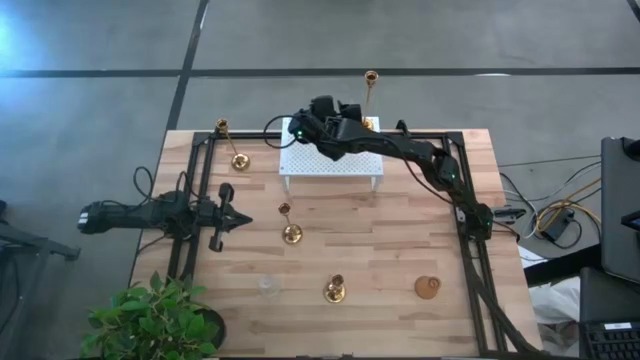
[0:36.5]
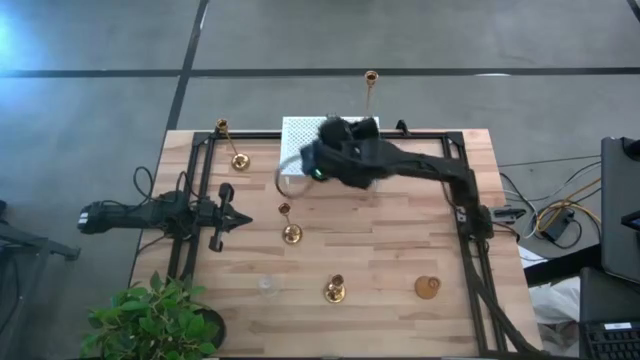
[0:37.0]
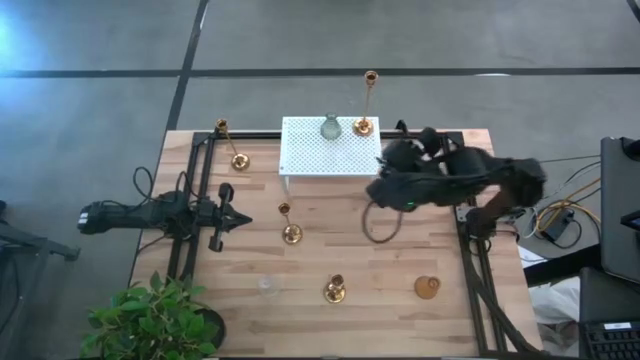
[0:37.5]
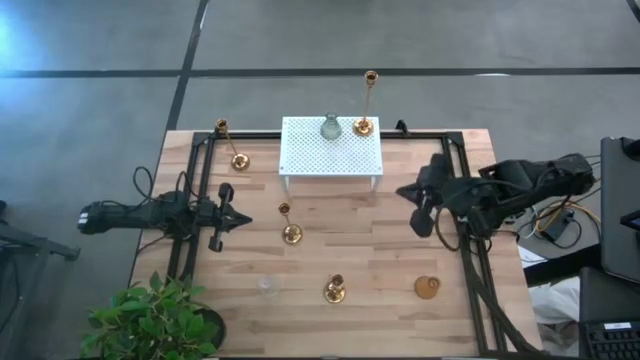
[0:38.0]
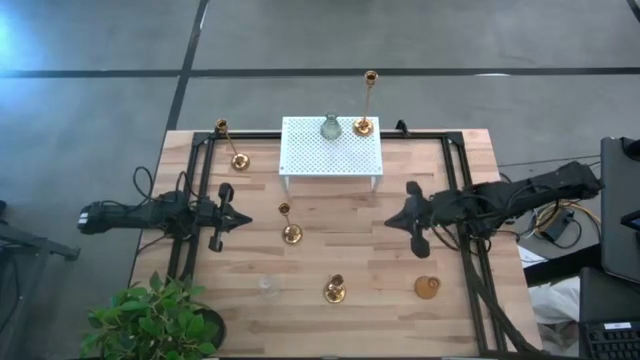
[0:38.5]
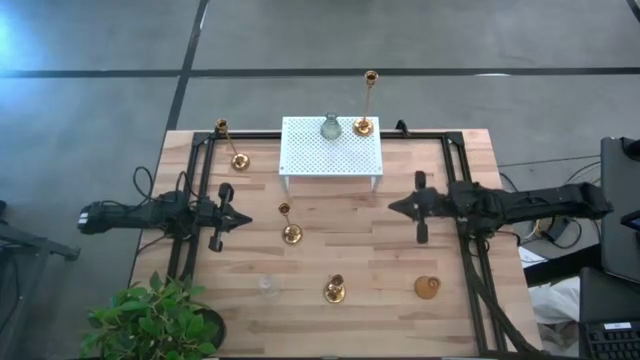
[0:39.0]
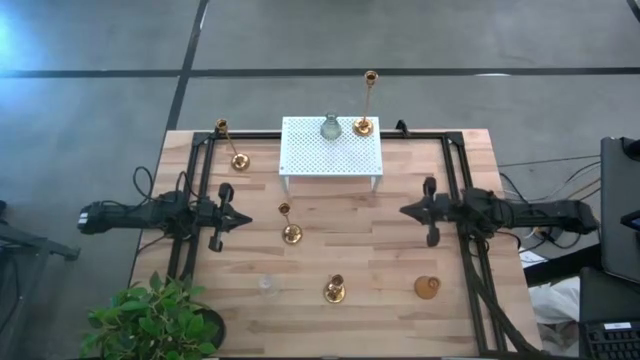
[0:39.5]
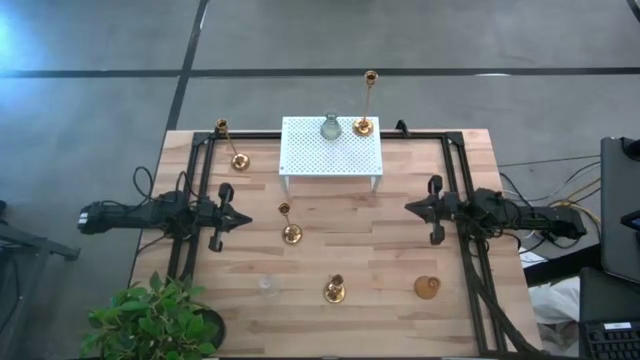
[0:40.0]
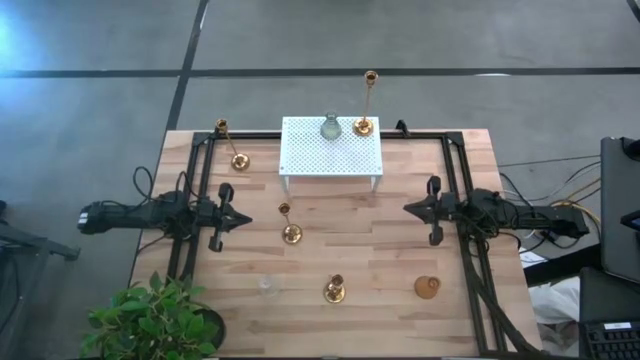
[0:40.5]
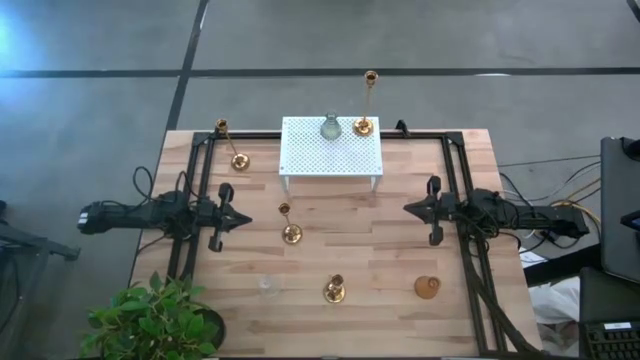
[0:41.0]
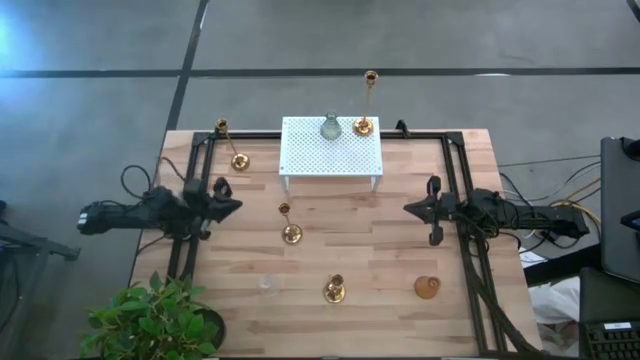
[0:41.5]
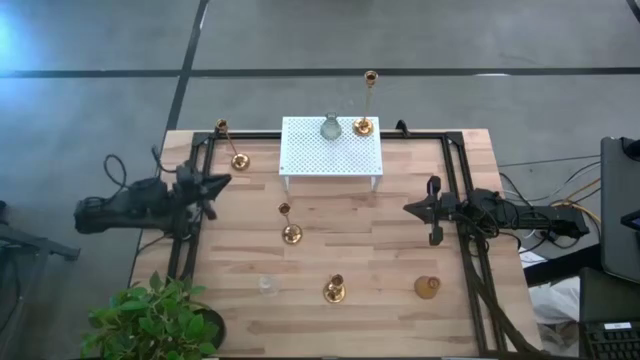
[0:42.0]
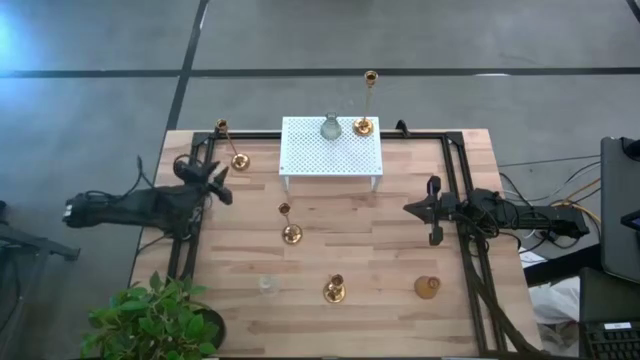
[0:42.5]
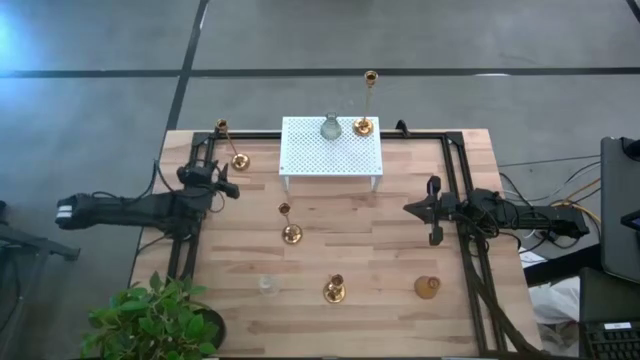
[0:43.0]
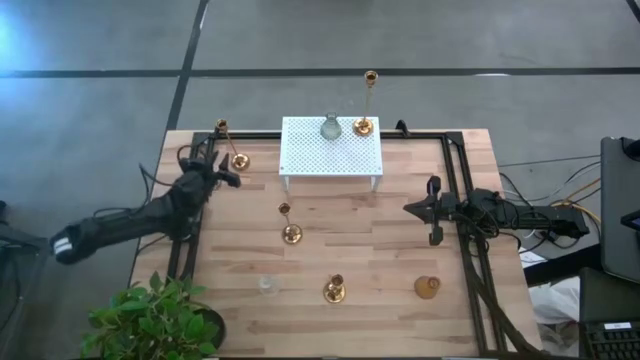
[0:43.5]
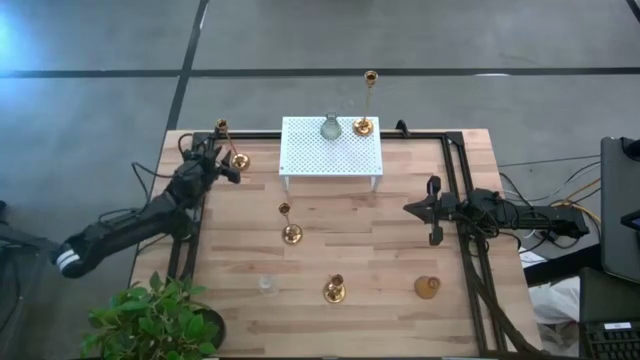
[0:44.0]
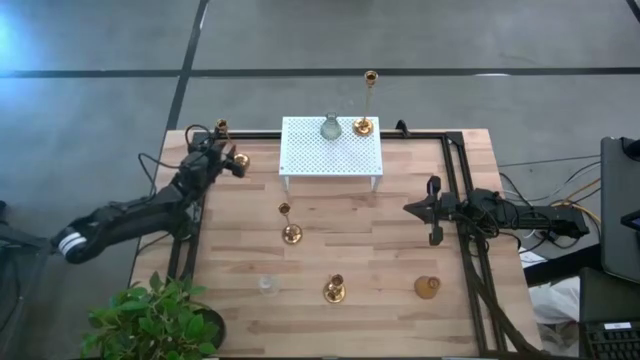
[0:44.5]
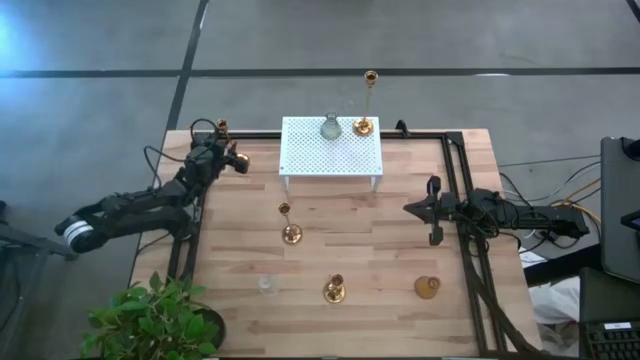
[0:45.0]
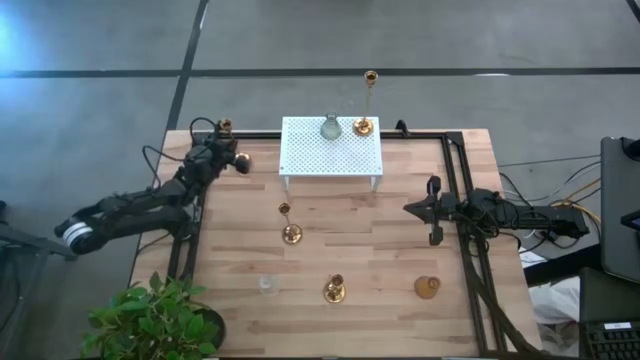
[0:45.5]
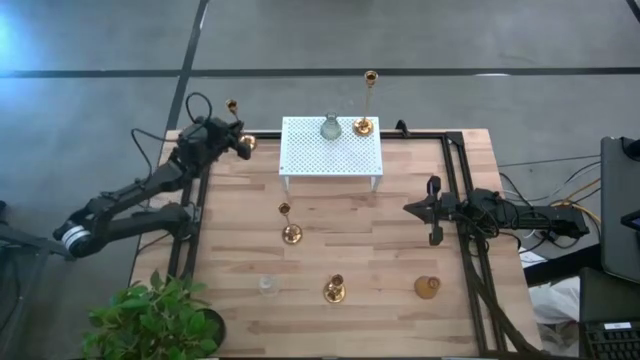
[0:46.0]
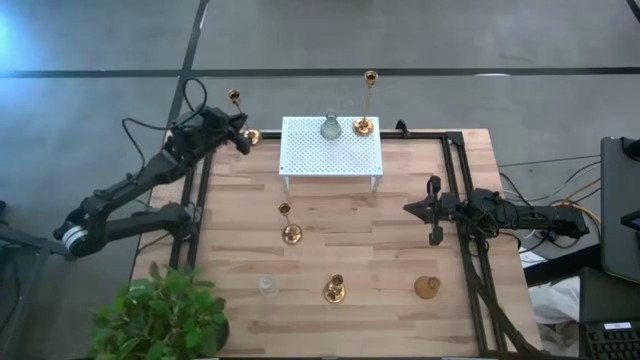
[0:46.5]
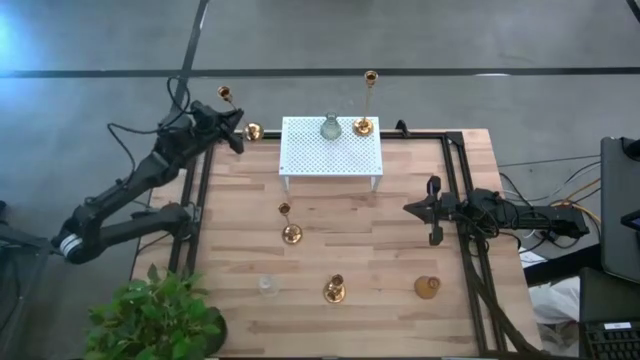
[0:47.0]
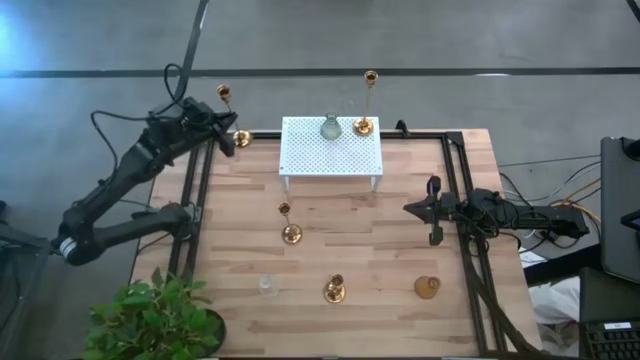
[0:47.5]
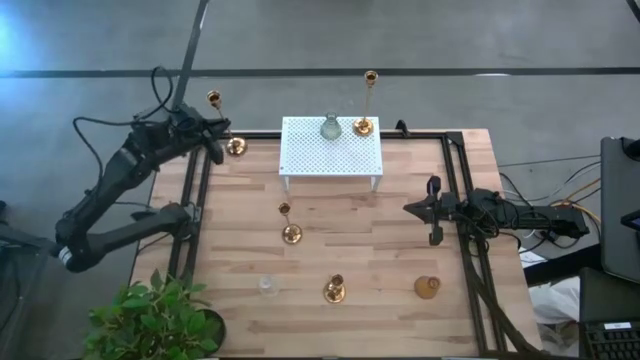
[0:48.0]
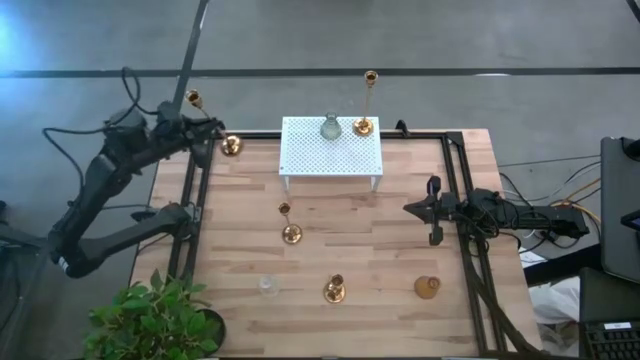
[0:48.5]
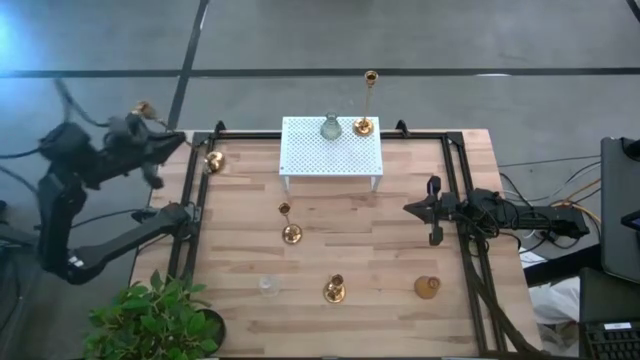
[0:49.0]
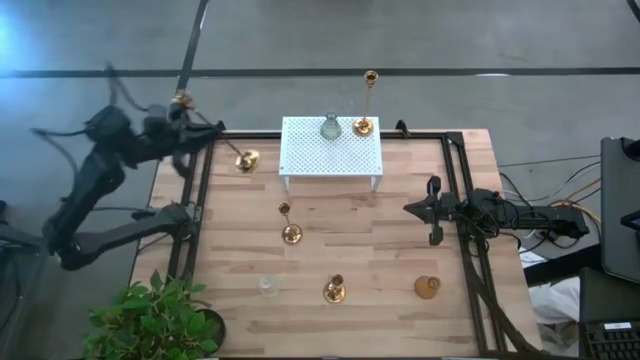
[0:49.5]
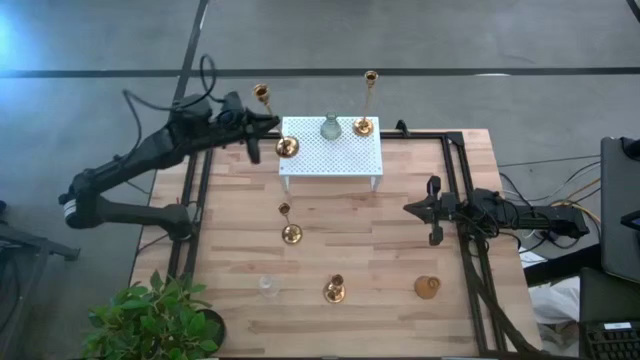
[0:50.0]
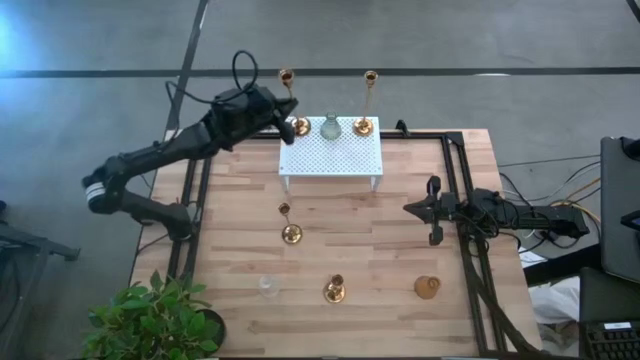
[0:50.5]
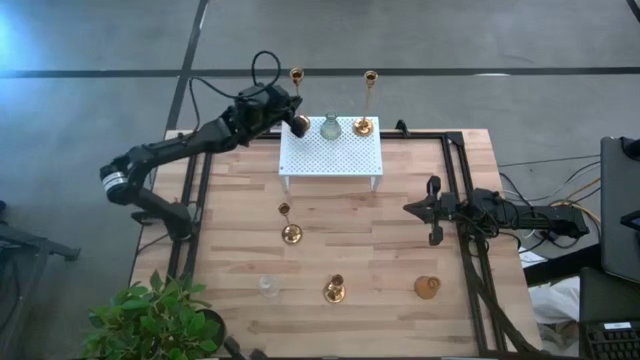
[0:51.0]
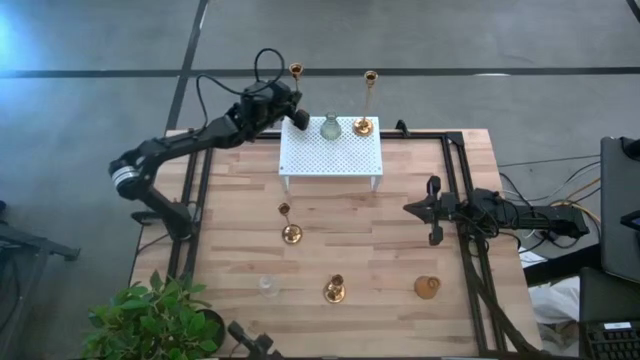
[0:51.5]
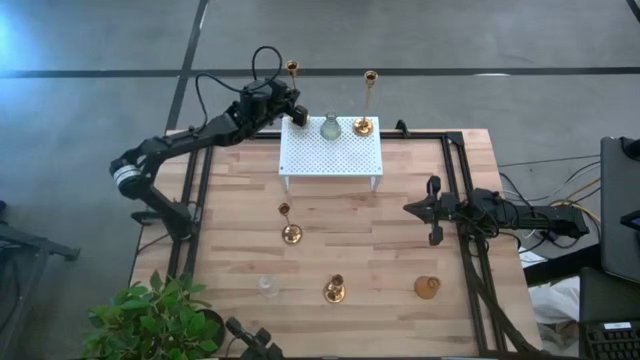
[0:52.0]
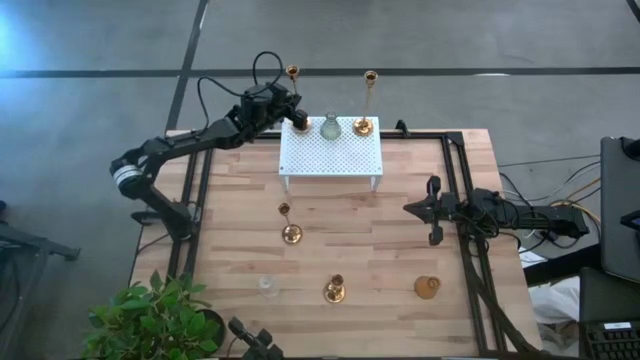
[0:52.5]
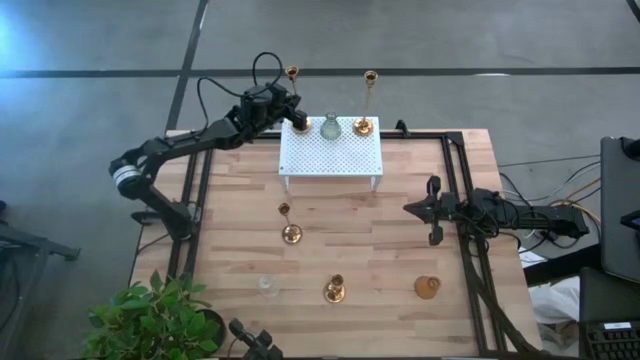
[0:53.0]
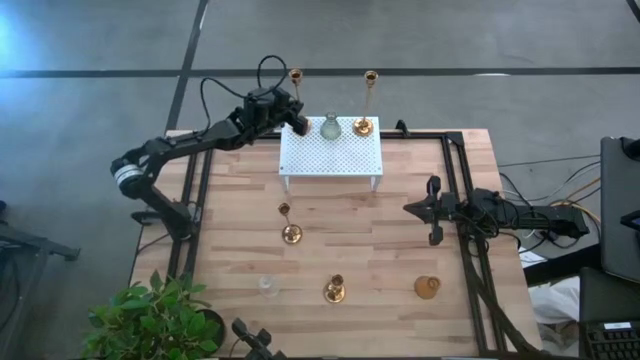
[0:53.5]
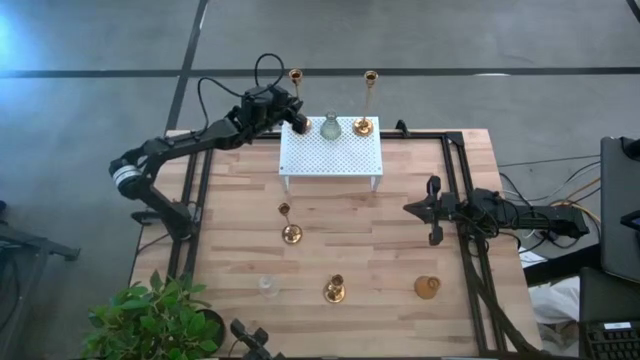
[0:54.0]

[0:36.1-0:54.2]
Task: Pick & Place candle stick holders
Put the gold candle holder on the shelf

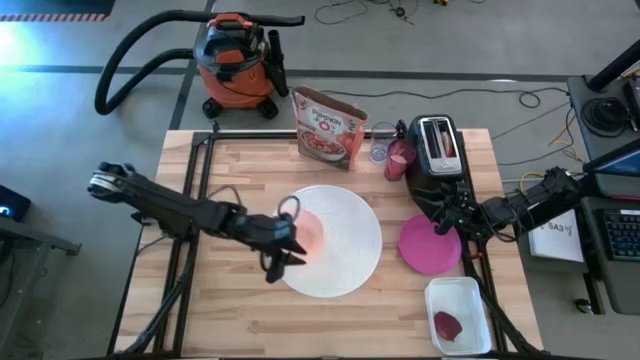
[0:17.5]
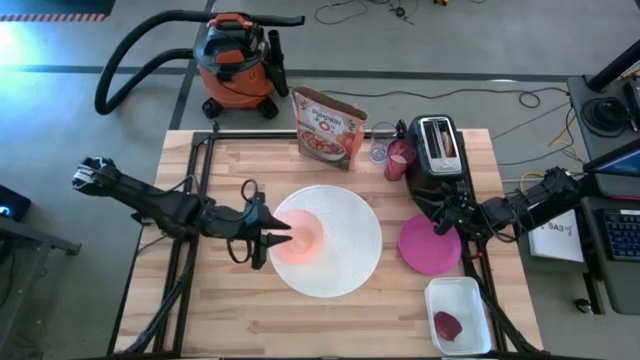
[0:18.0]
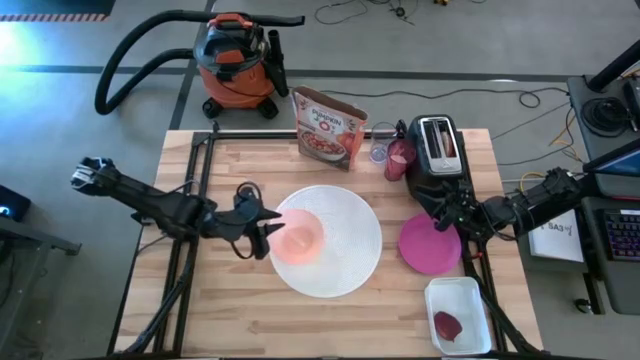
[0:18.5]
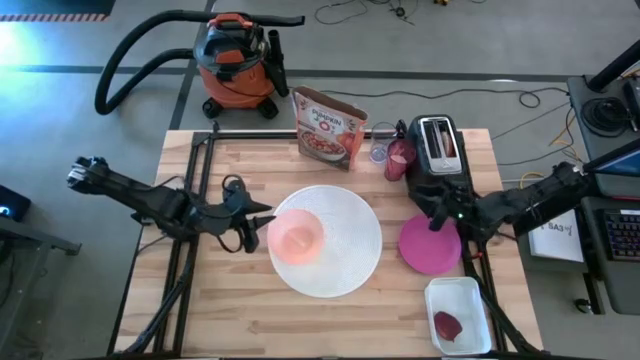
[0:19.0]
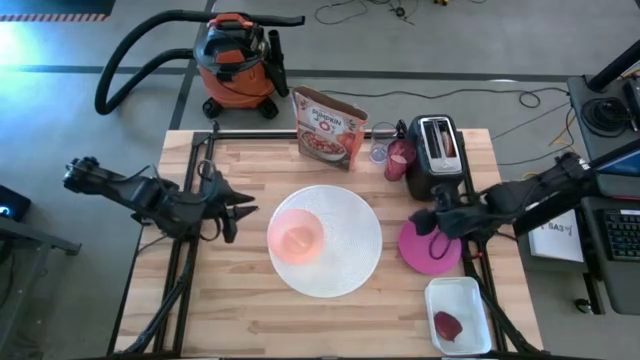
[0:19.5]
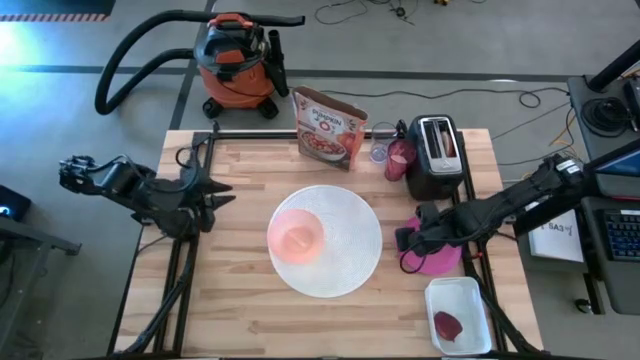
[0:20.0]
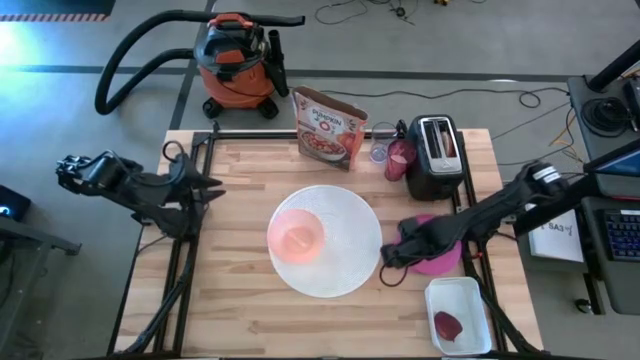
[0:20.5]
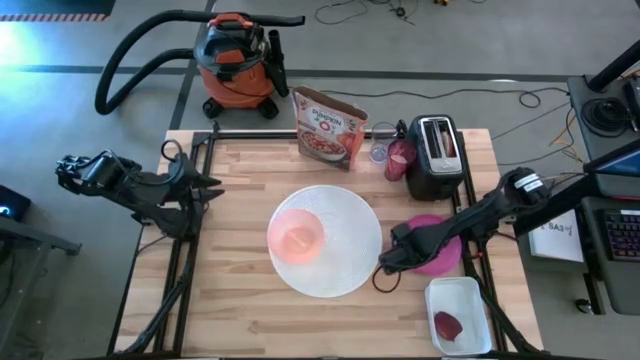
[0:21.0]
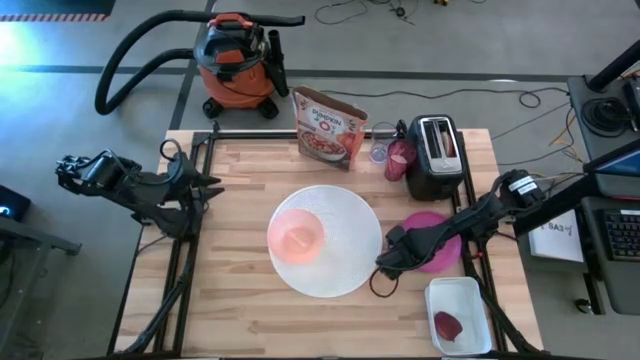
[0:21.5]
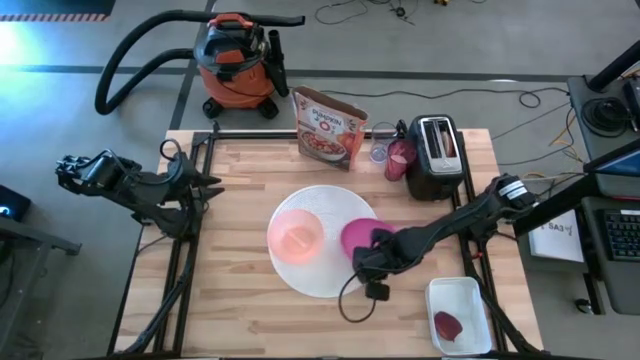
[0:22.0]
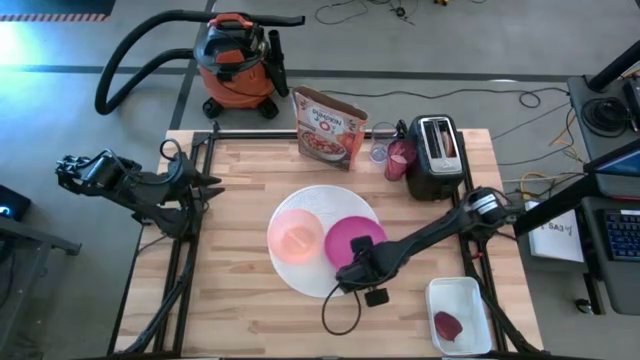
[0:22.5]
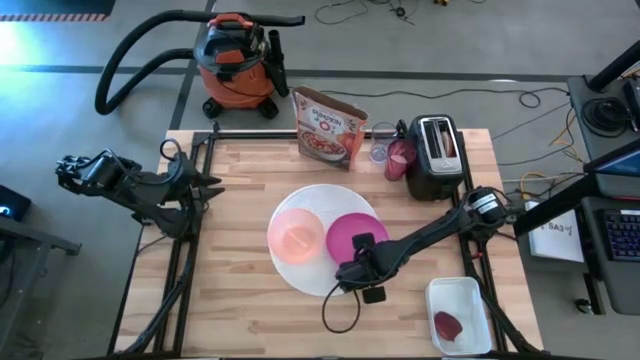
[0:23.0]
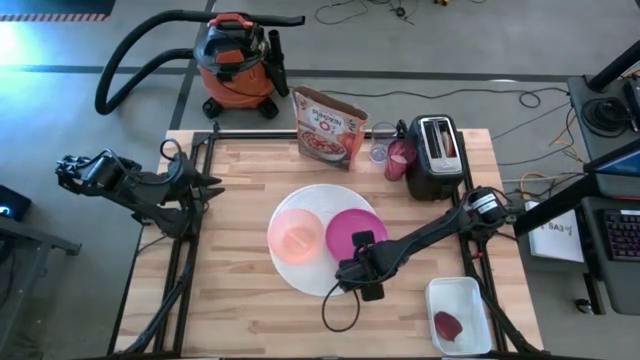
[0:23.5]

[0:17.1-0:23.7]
Task: Arrange a breakfast setting
Put the pink plate on the white table mat to the right of the orange bowl
